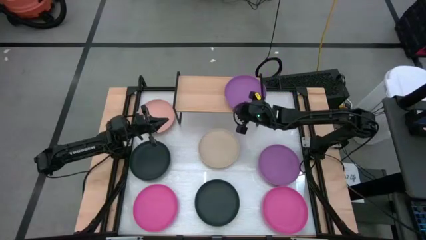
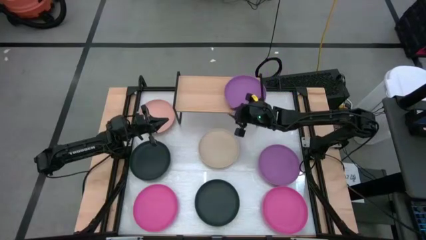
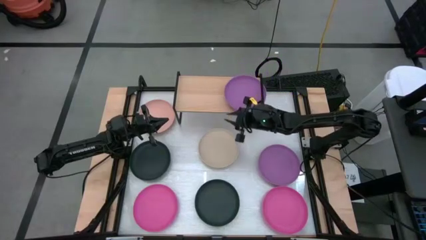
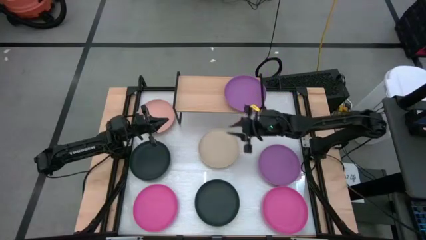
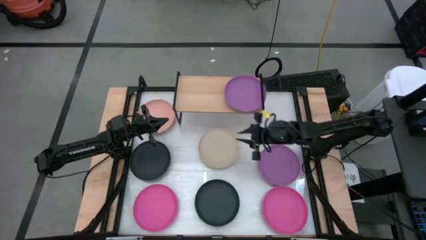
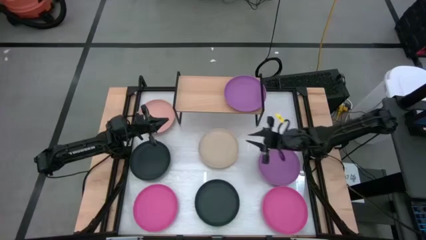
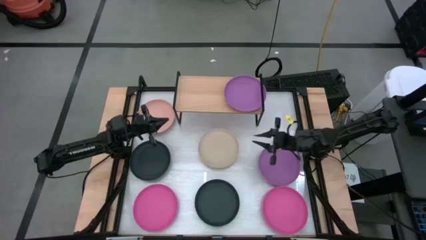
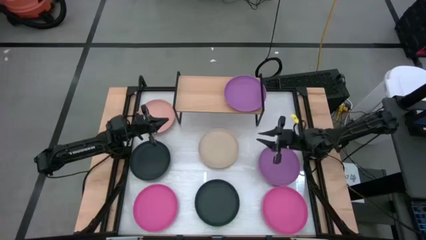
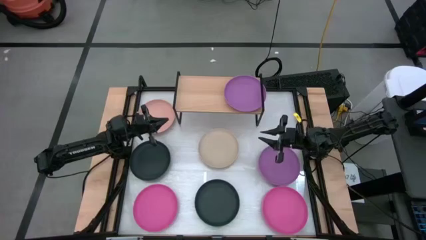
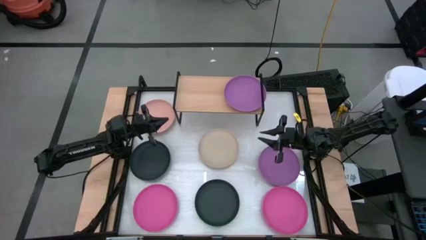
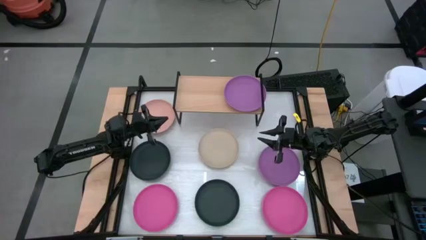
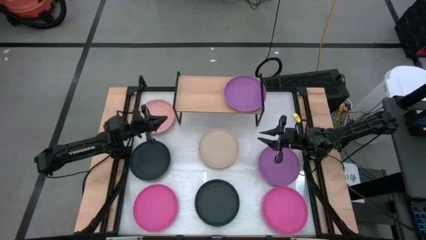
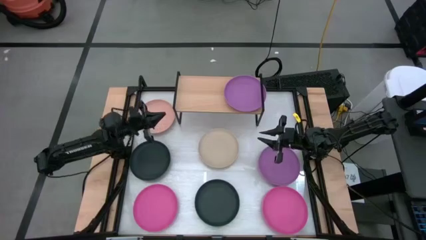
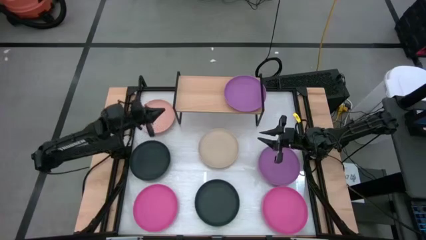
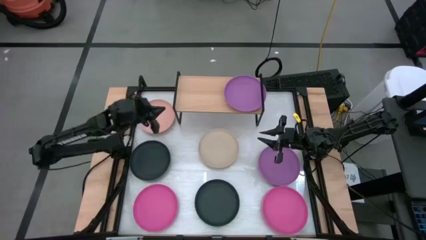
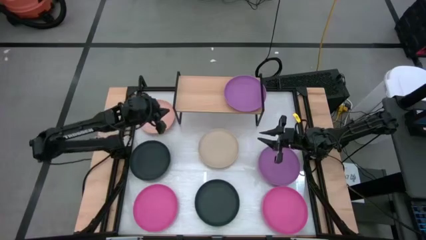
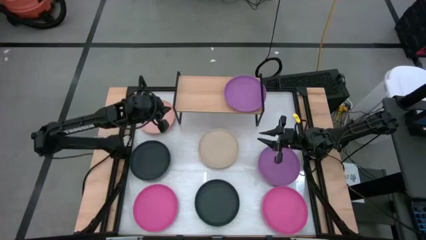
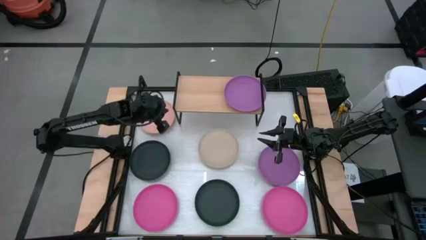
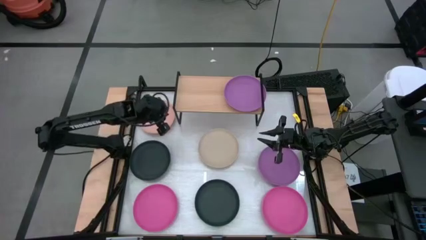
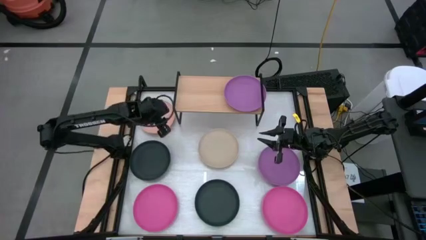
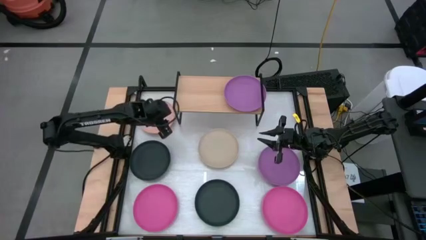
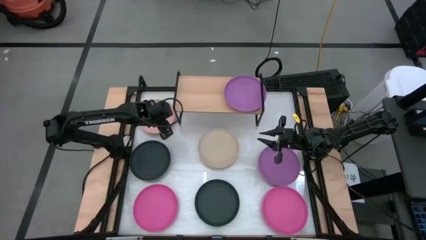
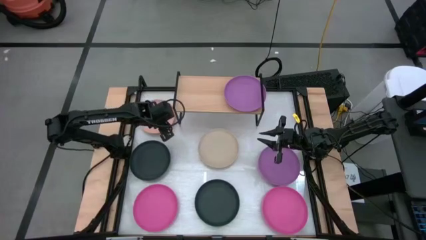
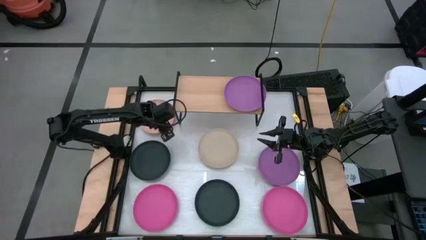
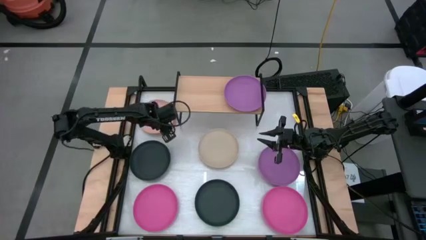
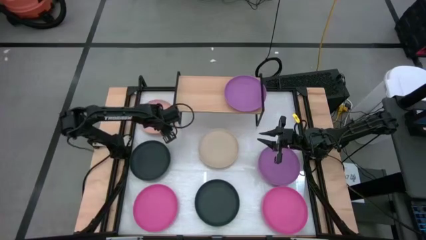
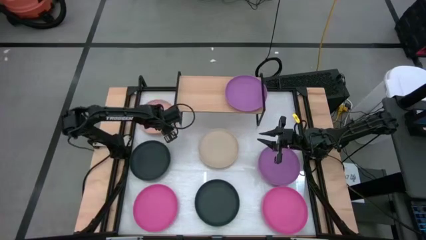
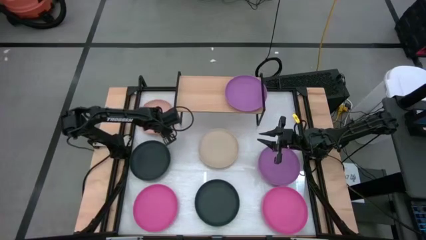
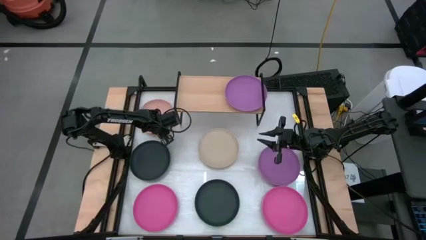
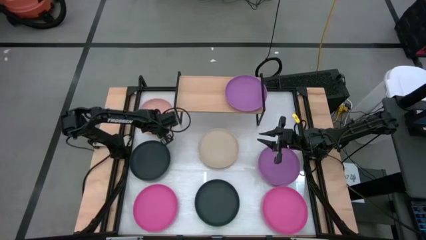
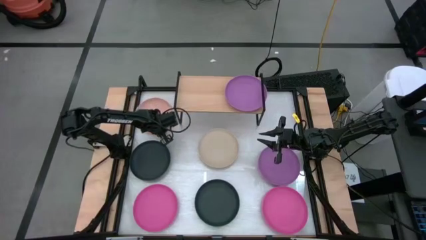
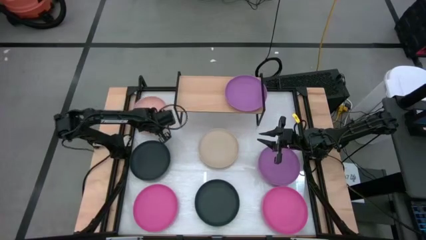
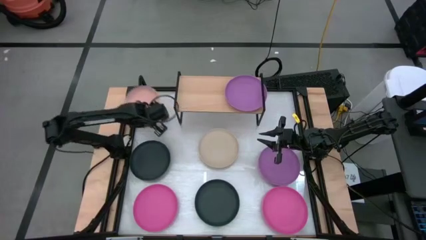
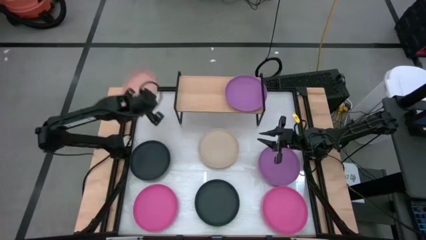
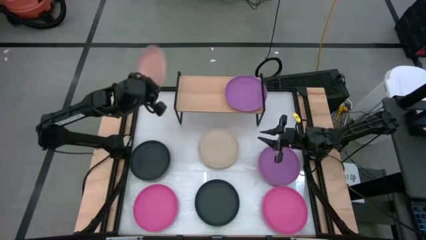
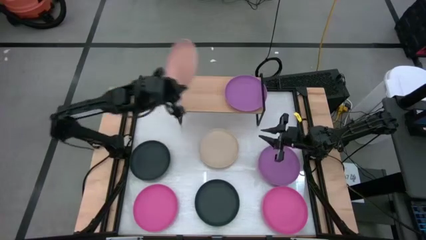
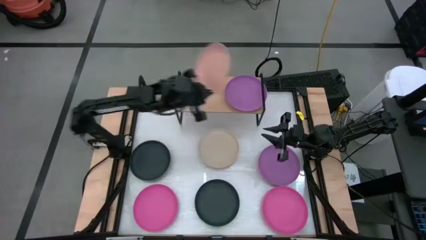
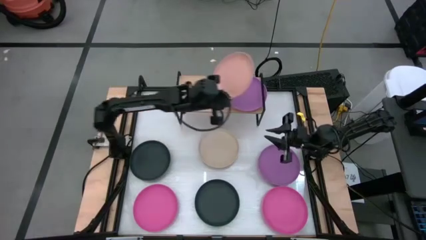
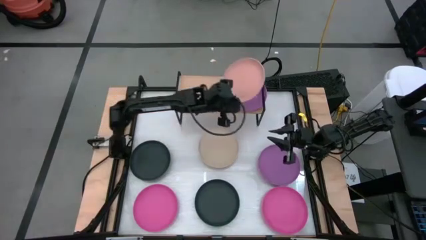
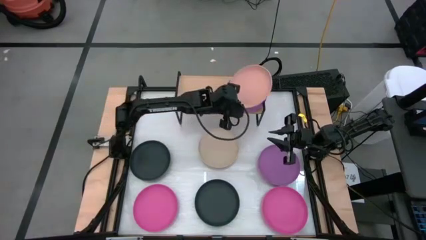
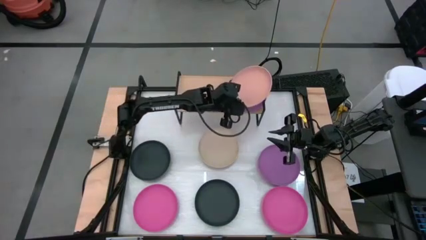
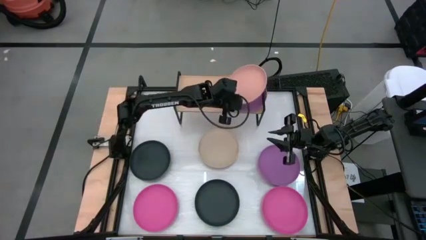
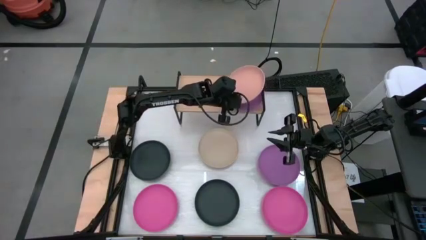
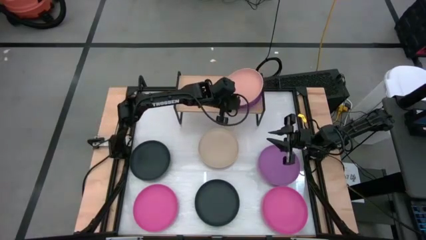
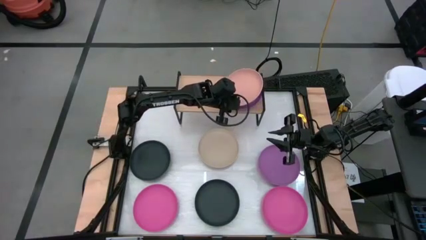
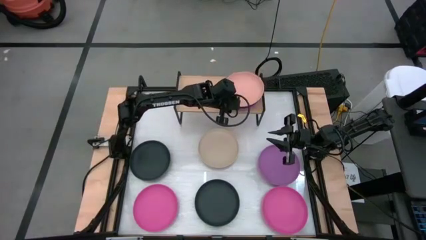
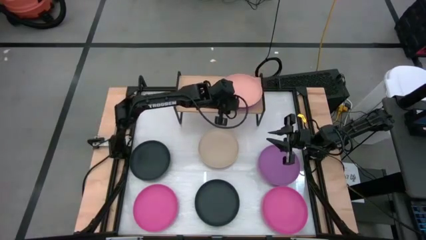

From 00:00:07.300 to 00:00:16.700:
Task: Place and stack plates onto a shelf
Stack the light pink plate on top of the purple plate on the shelf

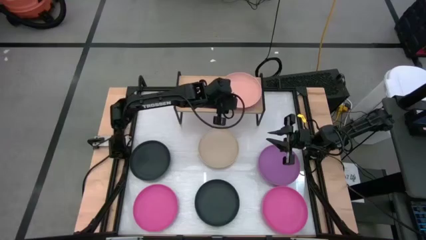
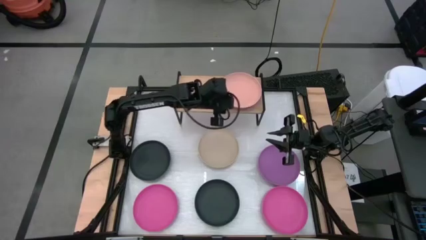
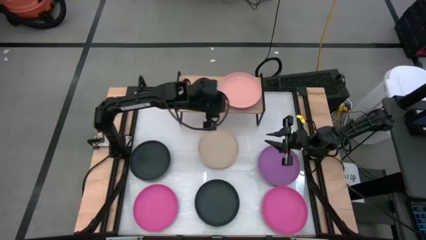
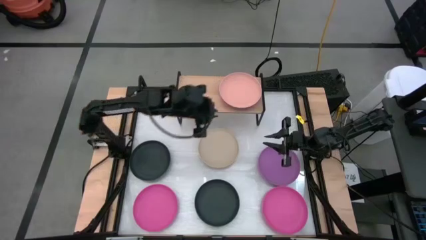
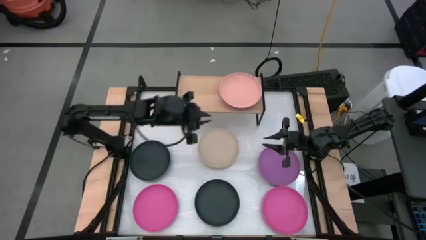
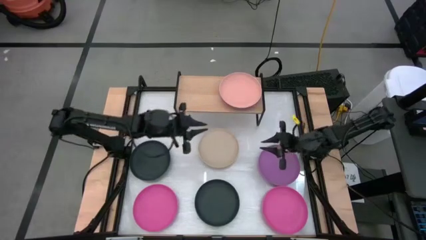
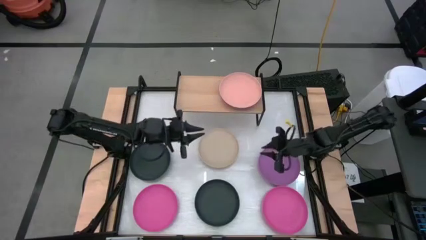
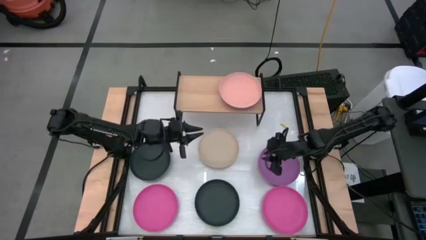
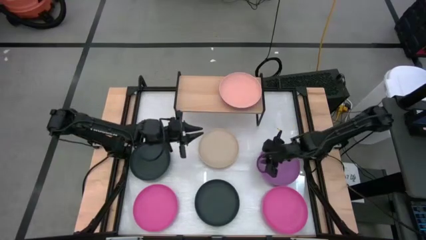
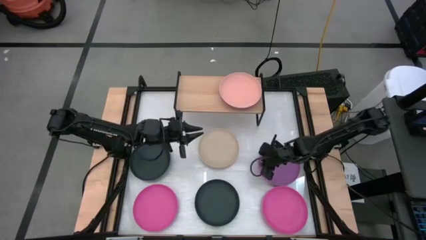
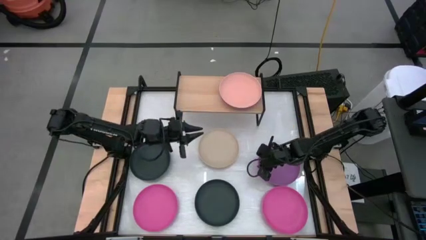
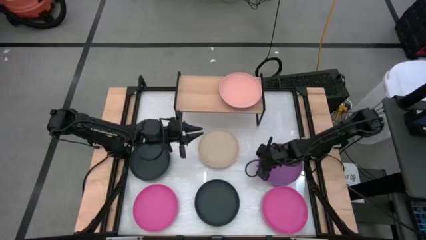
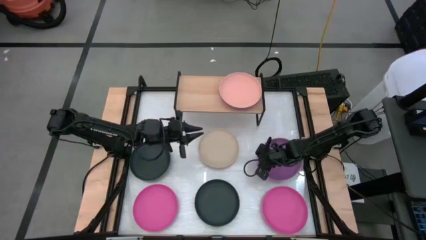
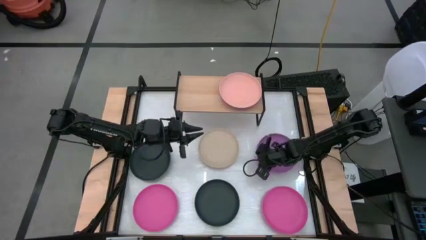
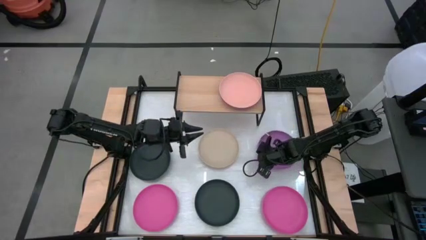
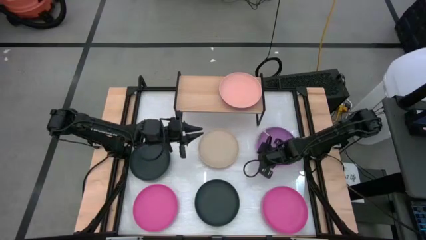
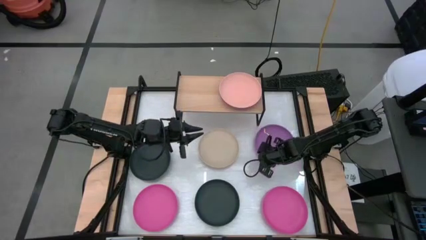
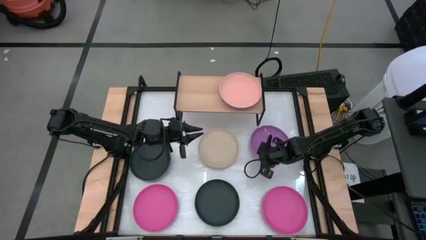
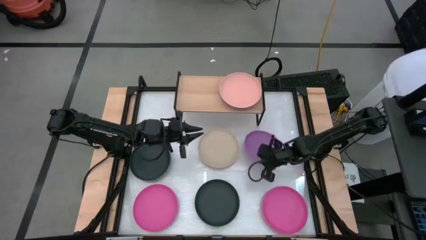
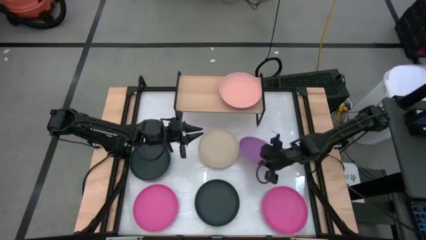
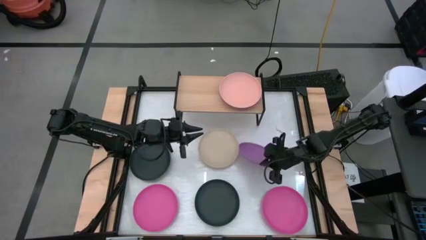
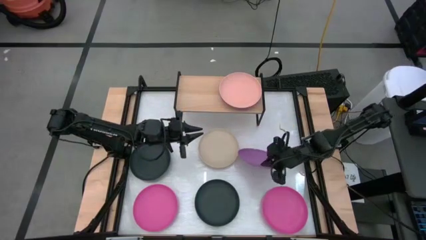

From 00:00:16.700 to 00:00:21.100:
Stack the purple plate on top of the light pink plate on the shelf

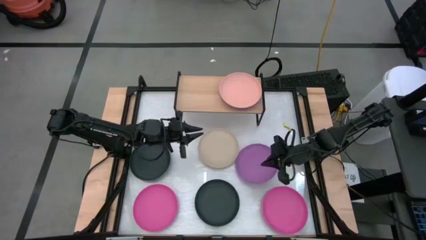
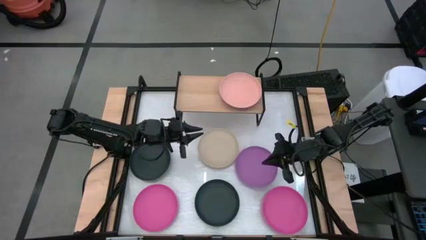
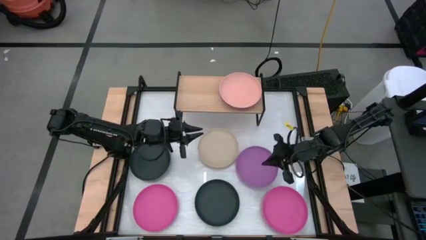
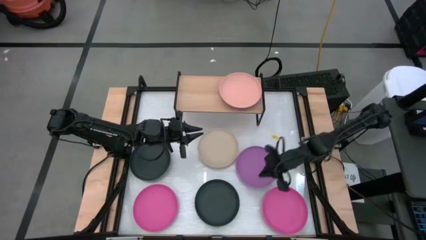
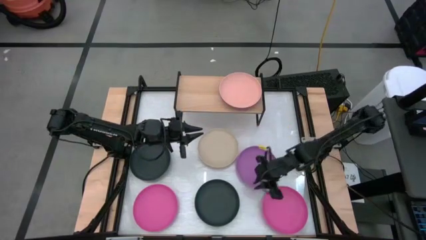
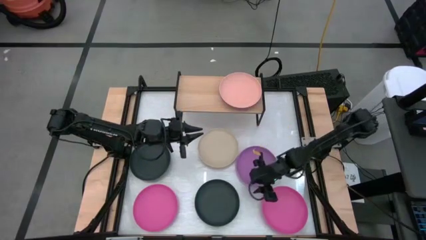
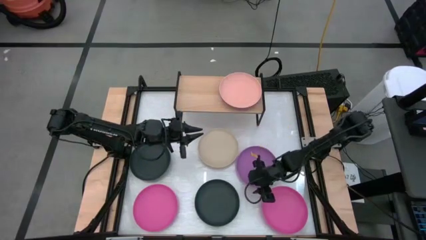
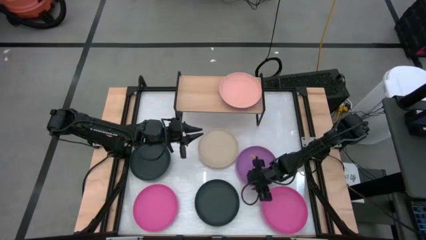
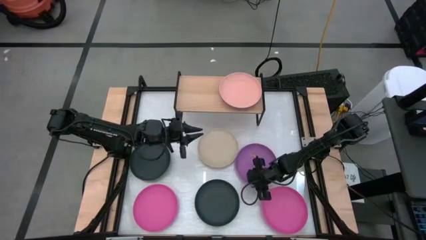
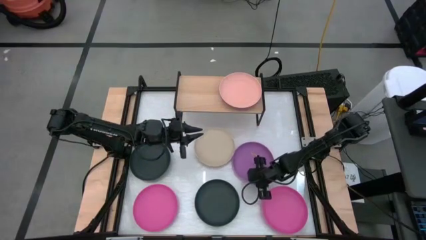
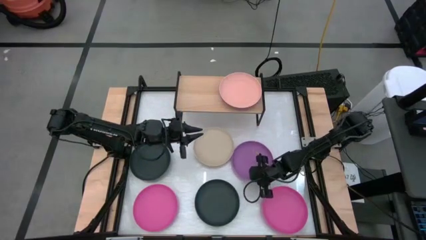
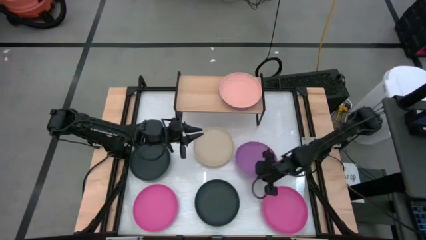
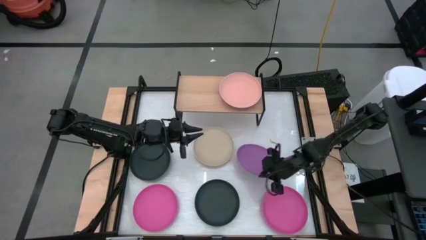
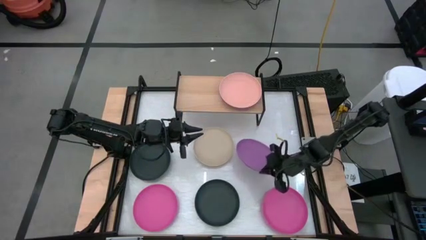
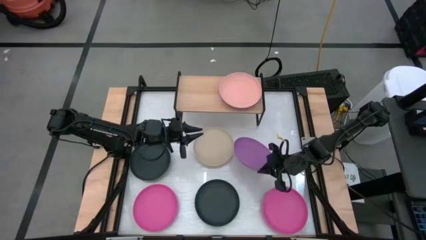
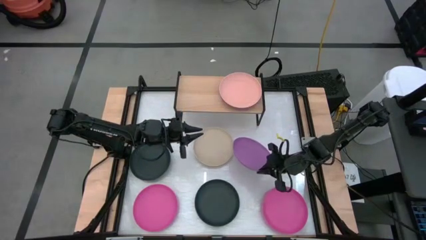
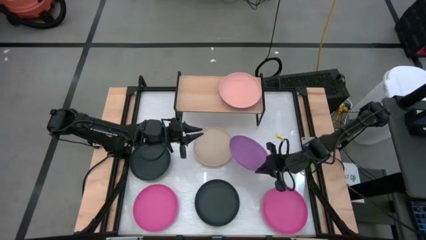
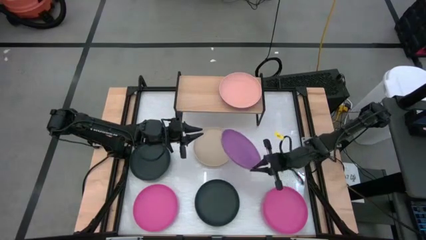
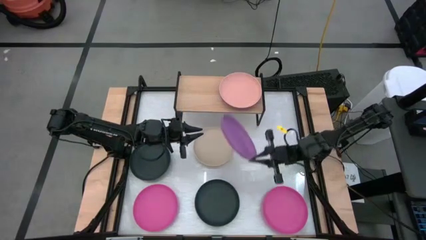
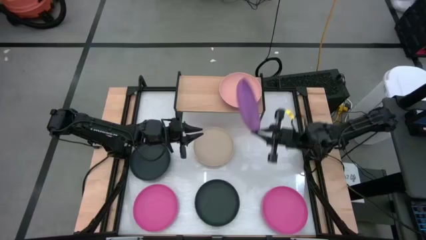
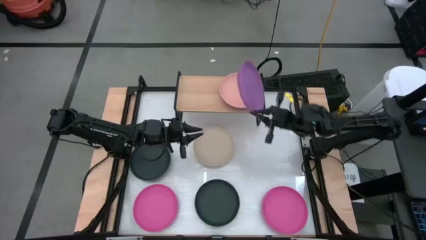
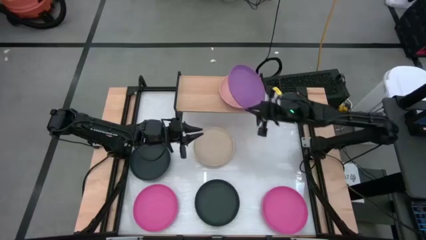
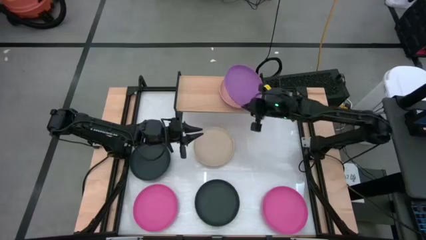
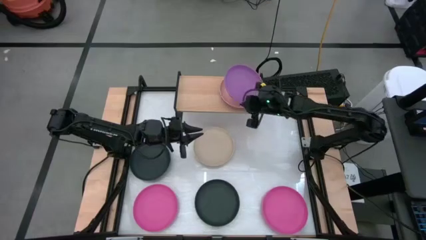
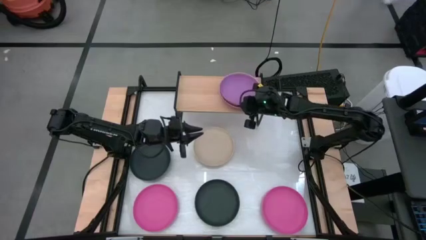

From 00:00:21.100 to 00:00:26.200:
Stack the purple plate on top of the light pink plate on the shelf
